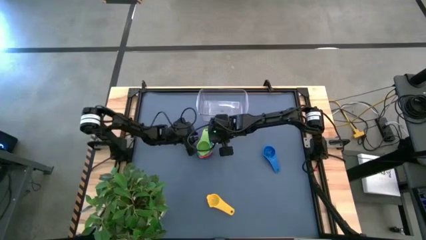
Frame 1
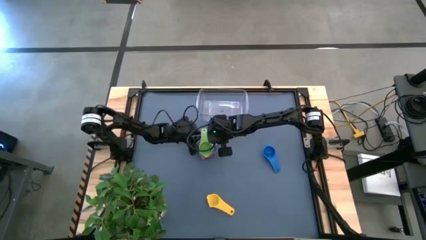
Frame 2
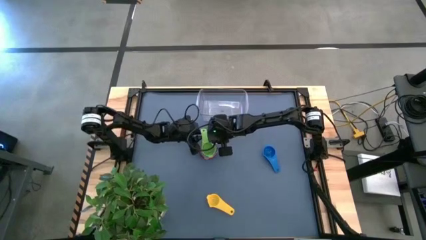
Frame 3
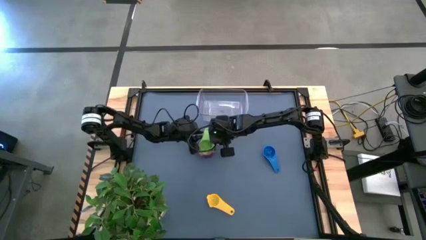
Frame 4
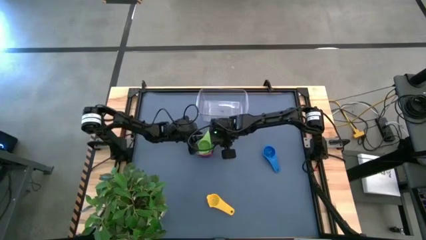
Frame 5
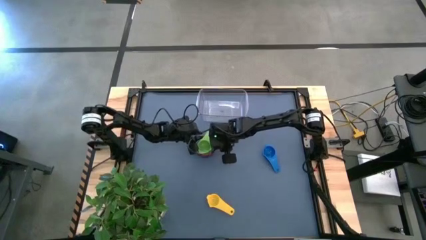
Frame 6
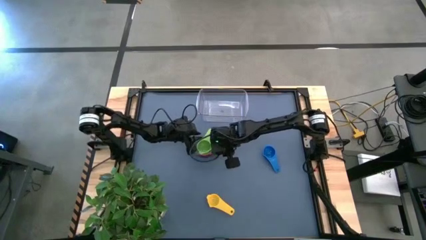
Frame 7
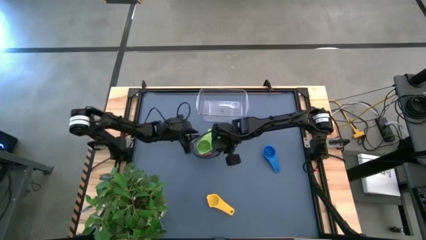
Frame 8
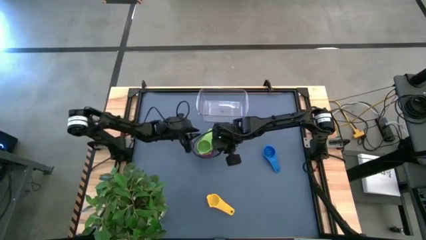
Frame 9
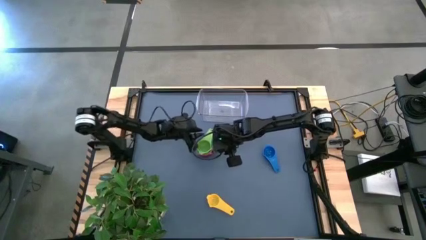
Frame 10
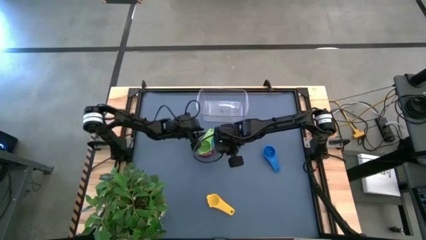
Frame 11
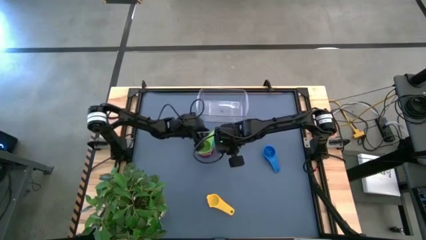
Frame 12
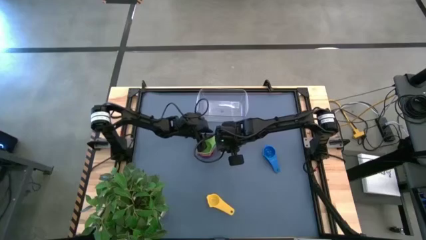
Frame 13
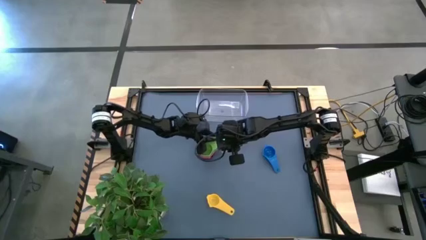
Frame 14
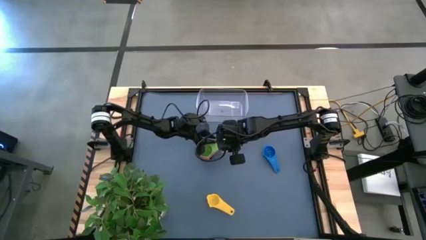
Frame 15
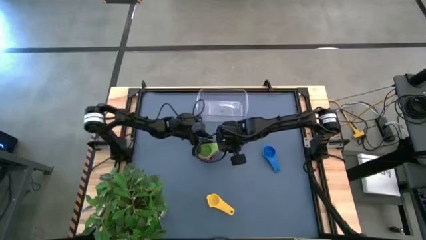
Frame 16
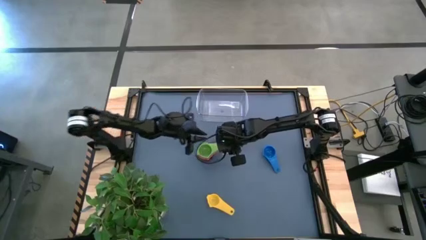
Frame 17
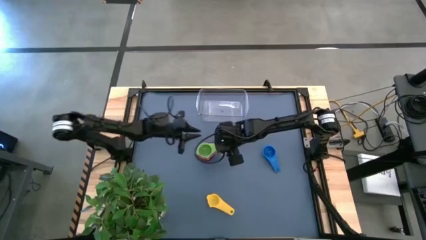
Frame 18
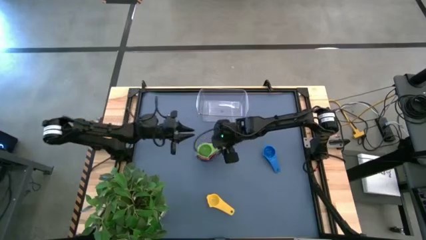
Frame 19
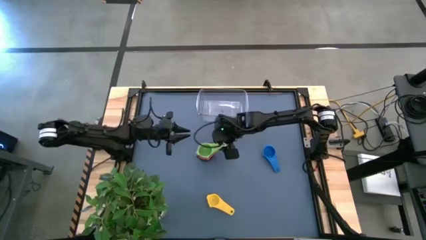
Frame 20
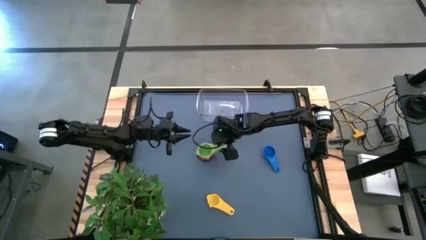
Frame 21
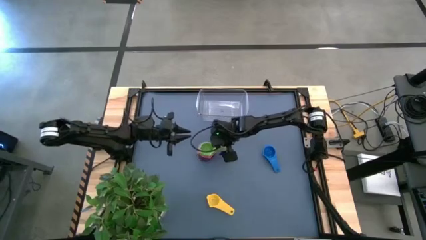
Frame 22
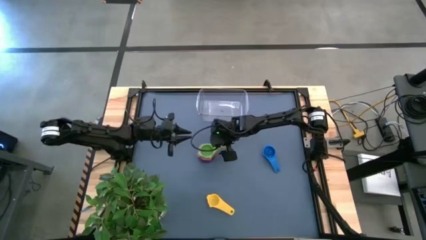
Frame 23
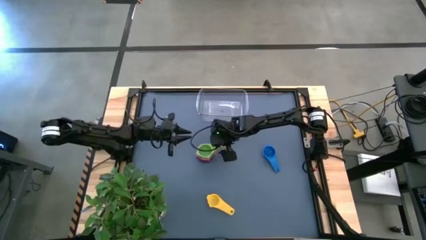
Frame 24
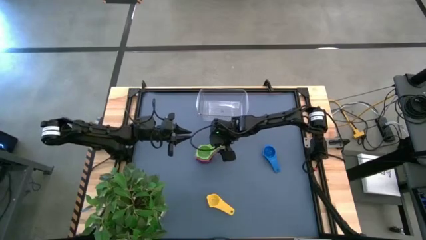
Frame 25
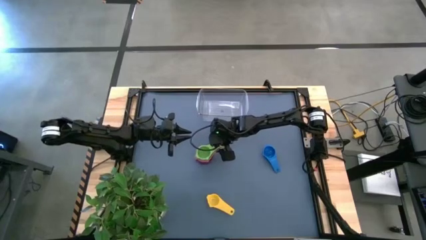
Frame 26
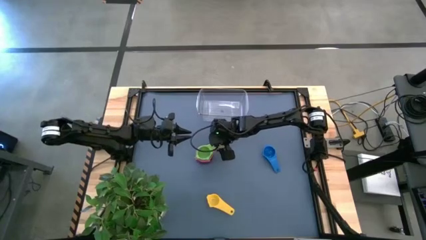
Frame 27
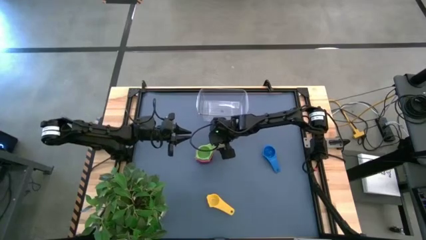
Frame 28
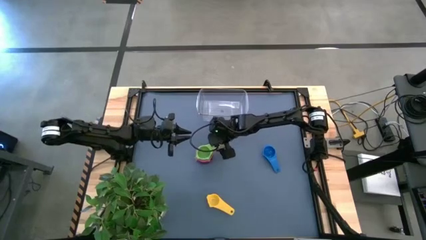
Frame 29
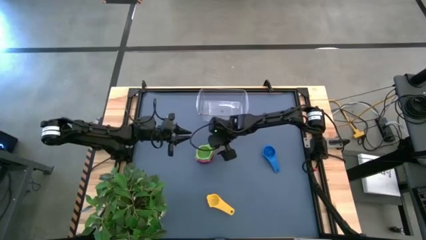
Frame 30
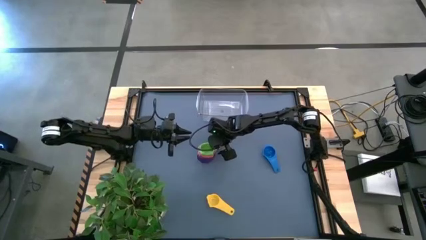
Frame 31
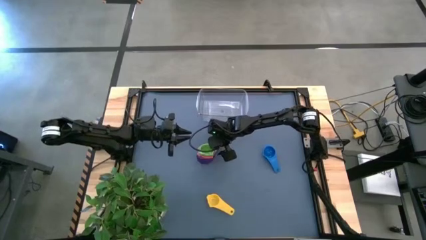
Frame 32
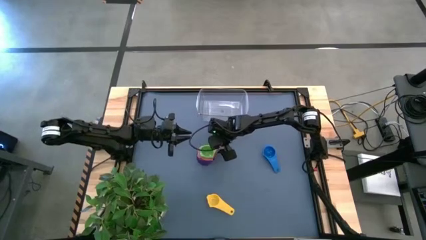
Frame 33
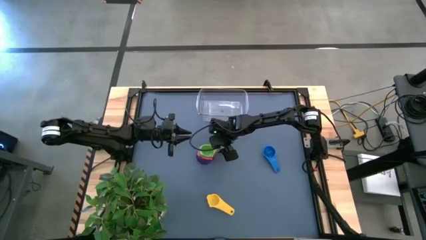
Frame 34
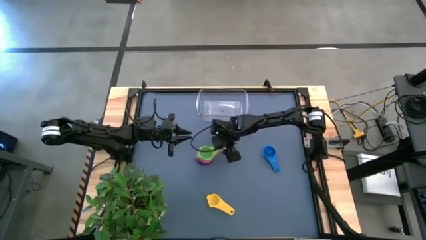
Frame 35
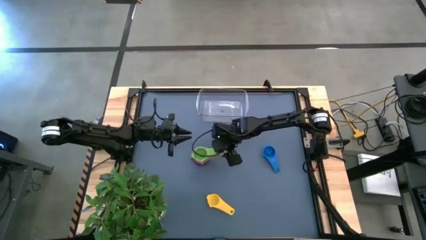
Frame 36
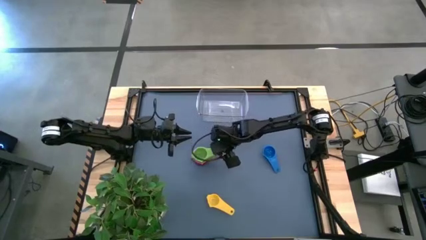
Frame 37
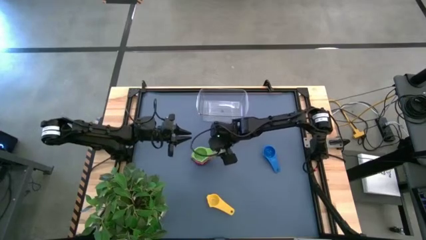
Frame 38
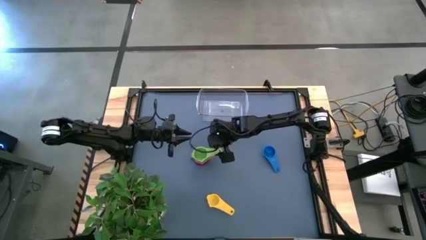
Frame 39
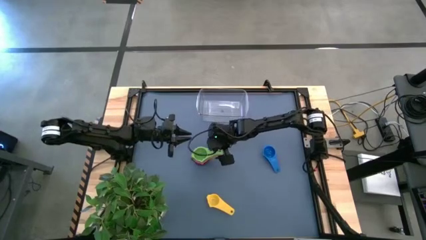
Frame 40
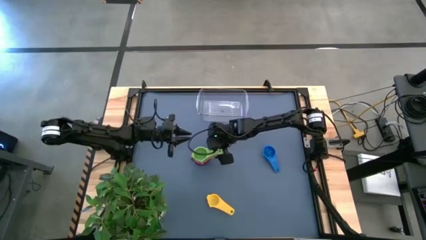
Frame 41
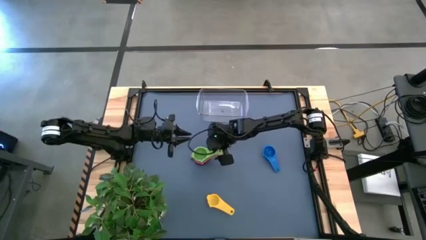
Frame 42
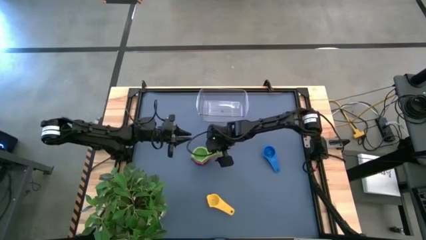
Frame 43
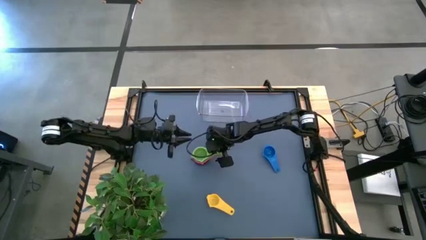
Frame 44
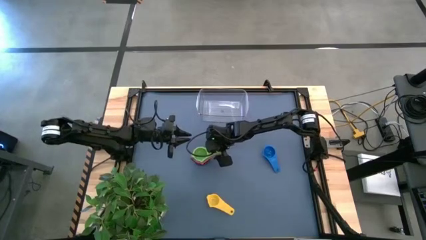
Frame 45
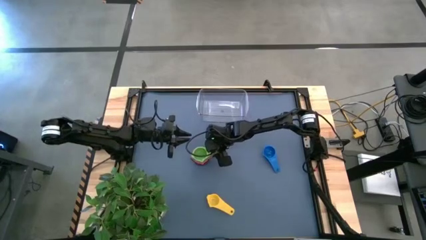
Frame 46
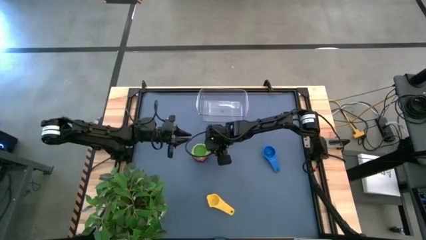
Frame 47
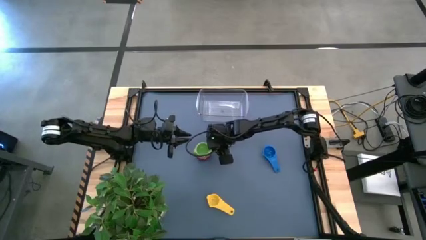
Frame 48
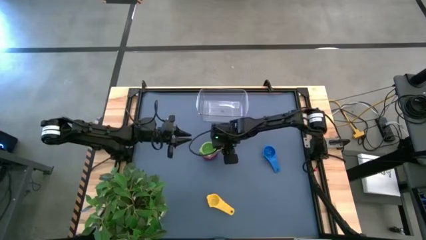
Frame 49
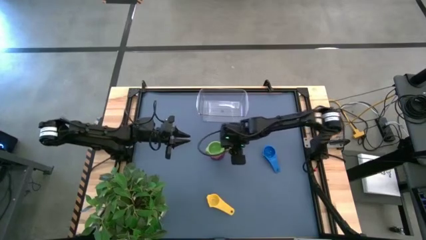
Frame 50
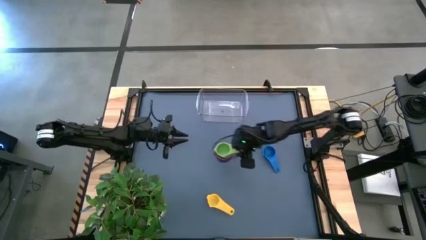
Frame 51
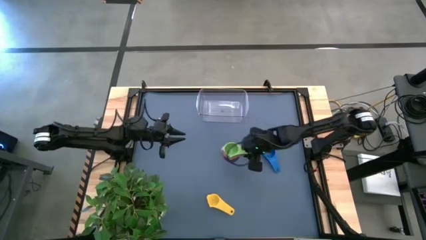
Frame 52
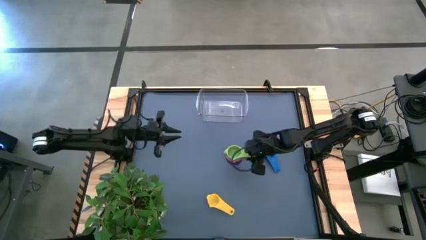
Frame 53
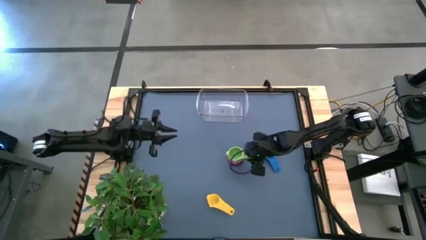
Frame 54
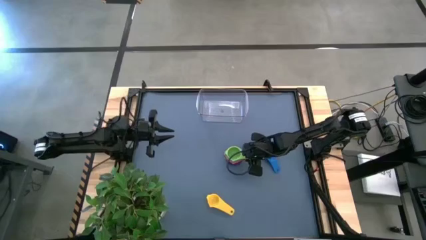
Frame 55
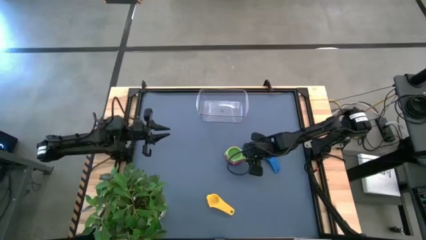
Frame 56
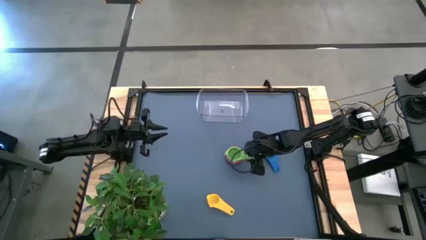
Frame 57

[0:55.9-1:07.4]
Task: Nest measuring cups in basket
Move the nested measuring cups to the center of the table

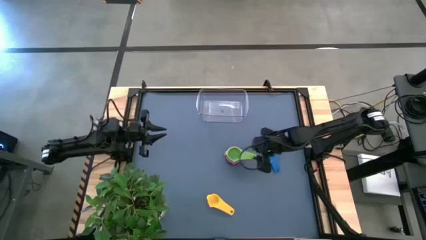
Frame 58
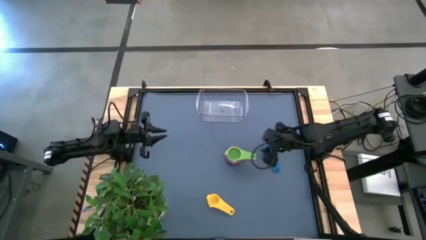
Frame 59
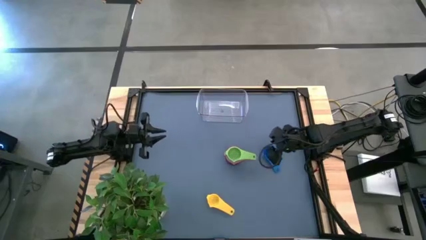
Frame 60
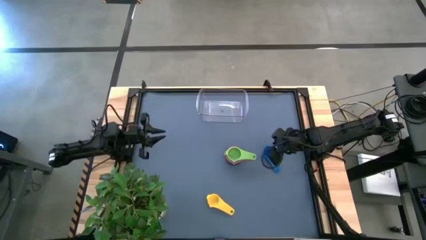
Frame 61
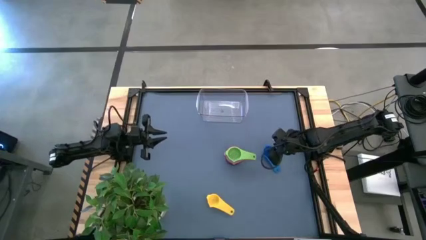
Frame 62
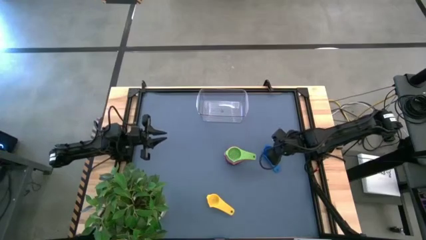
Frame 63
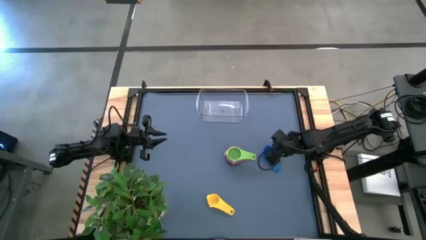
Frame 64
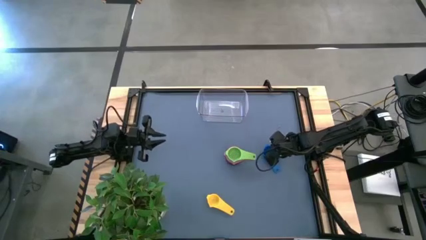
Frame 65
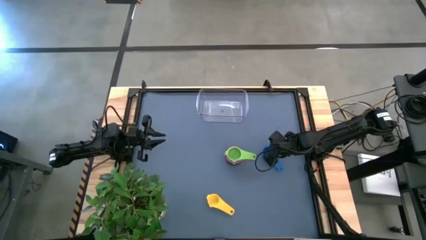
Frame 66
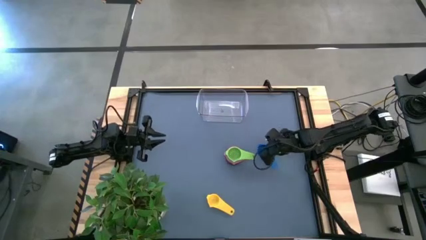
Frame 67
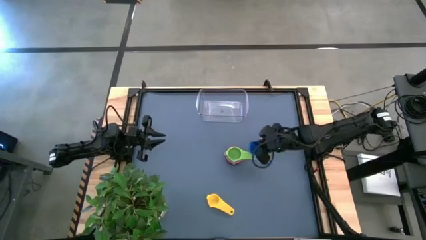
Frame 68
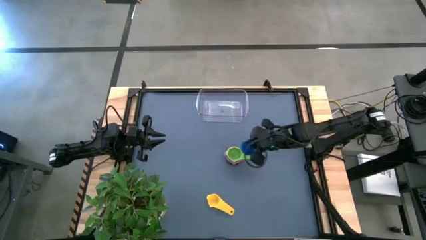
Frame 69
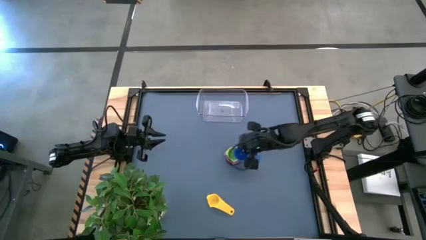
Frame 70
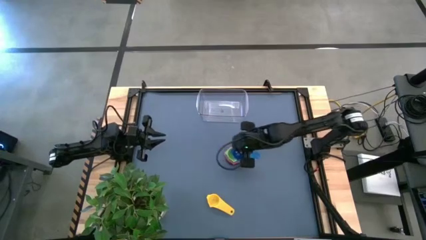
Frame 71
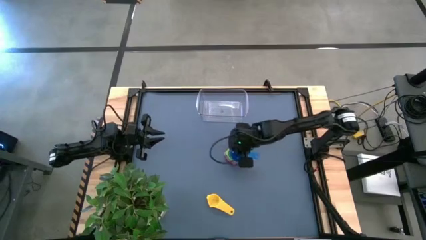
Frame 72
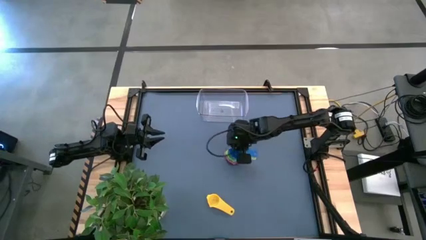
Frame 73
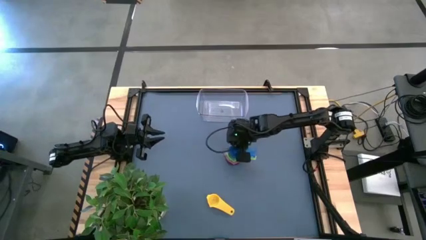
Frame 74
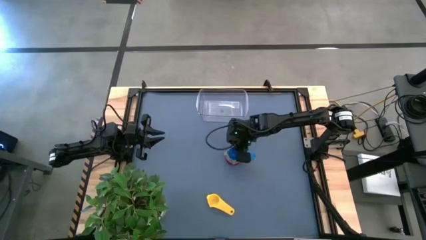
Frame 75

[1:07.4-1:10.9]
Stack the blue measuring cup on top of the green measuring cup
